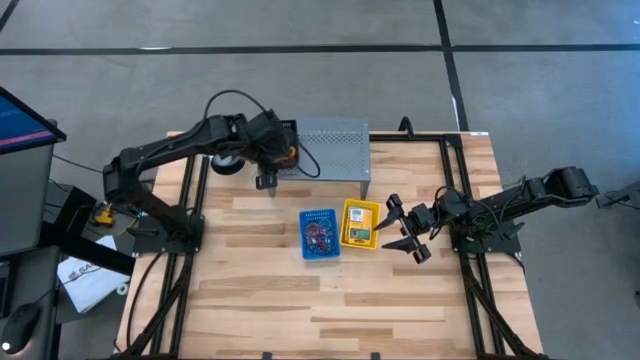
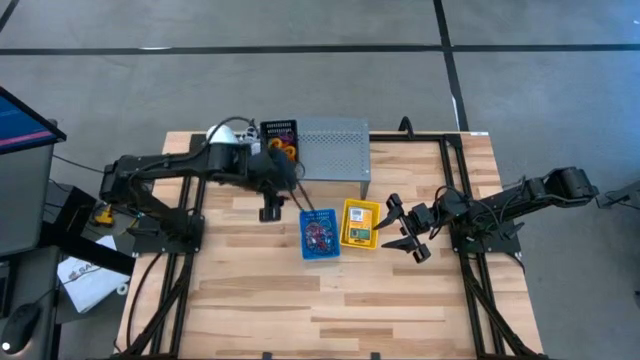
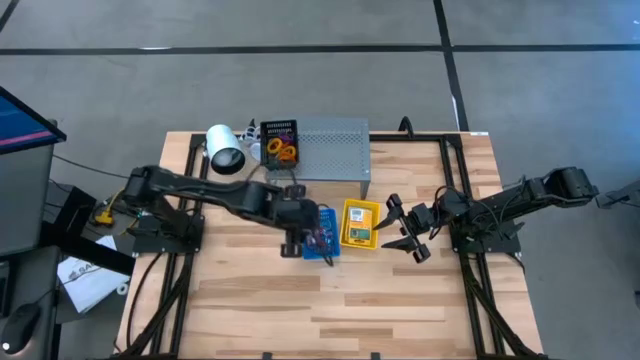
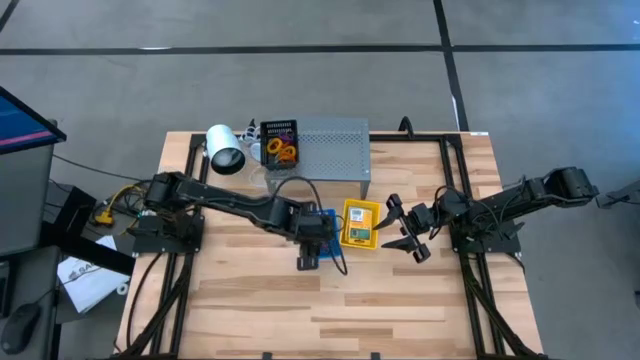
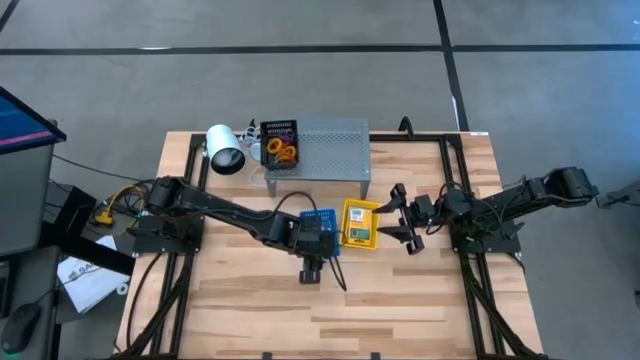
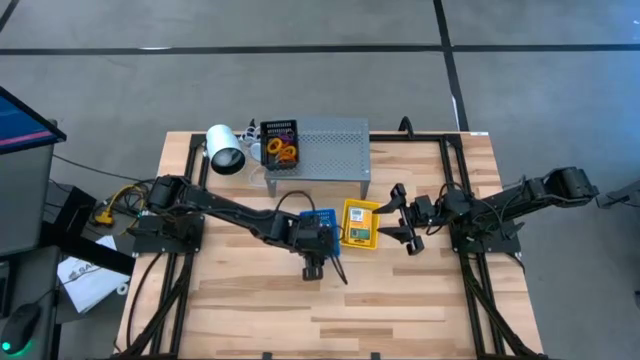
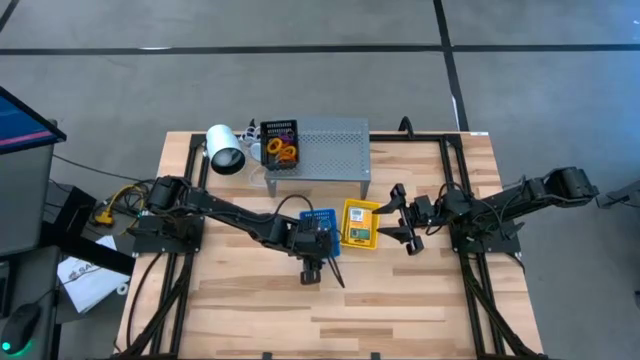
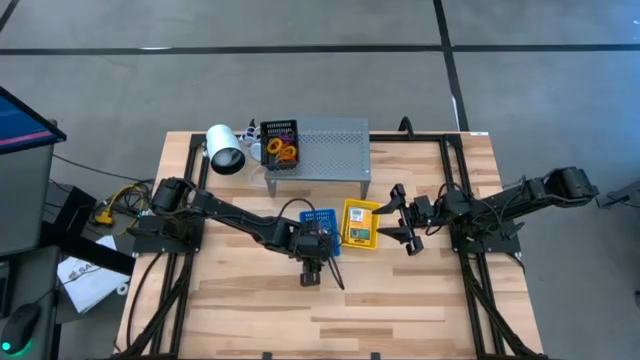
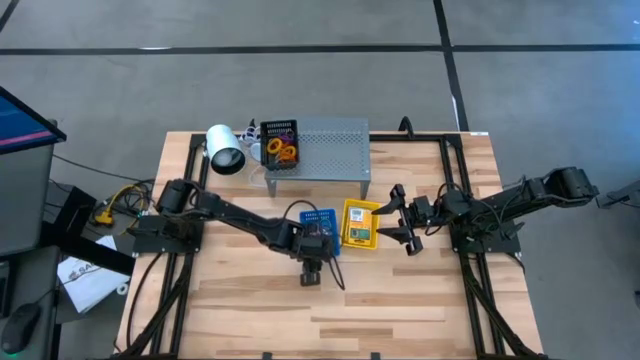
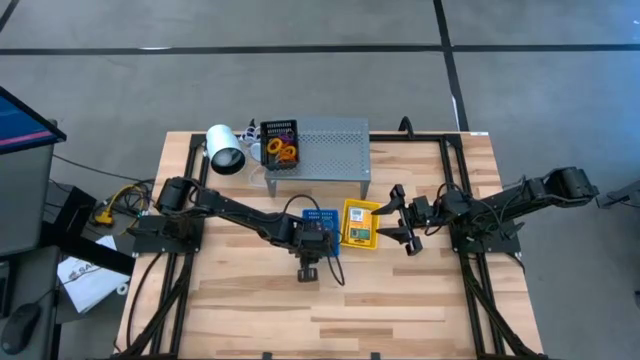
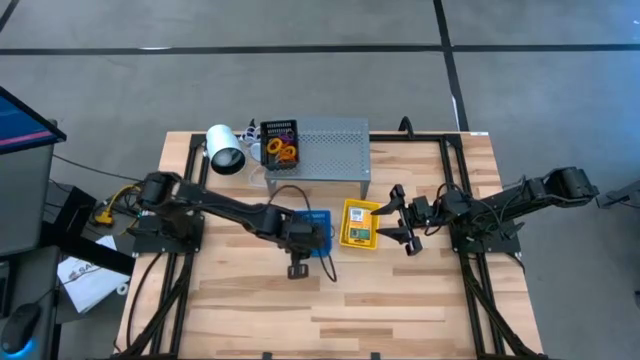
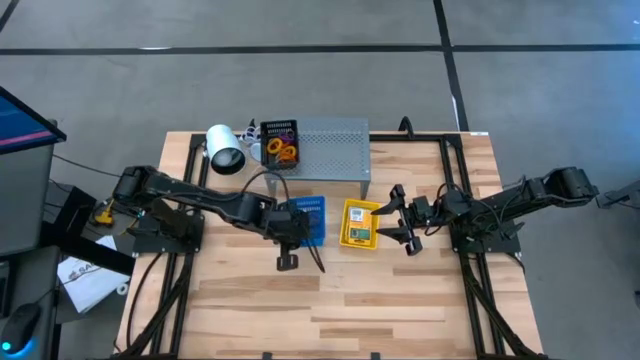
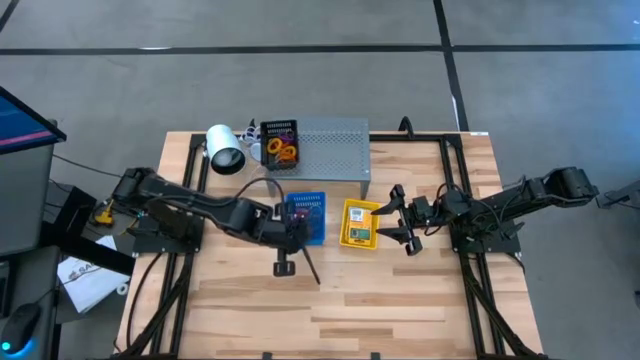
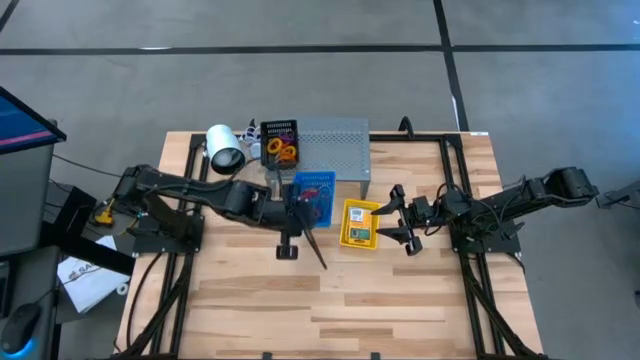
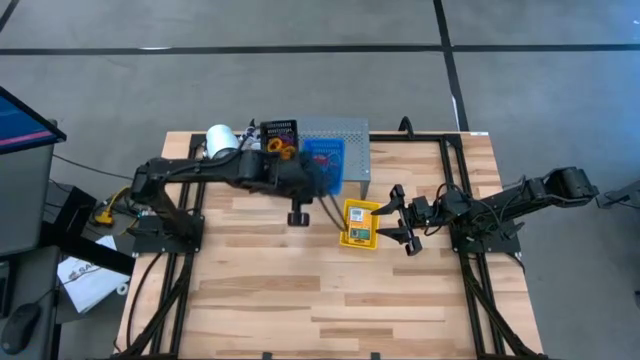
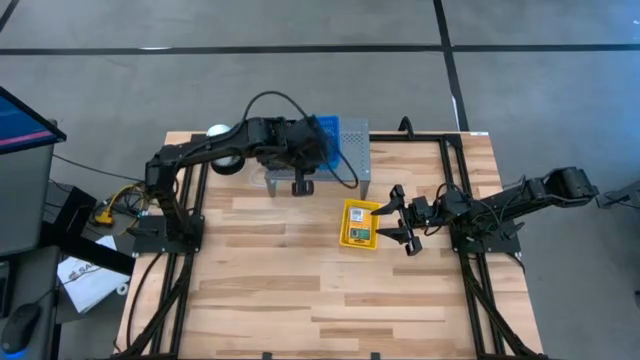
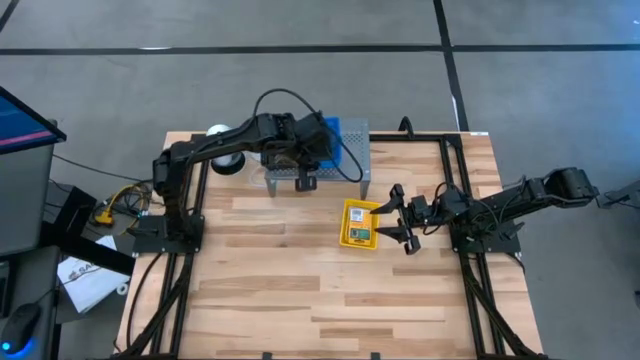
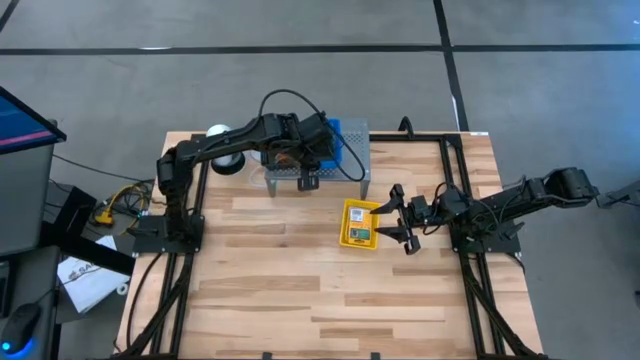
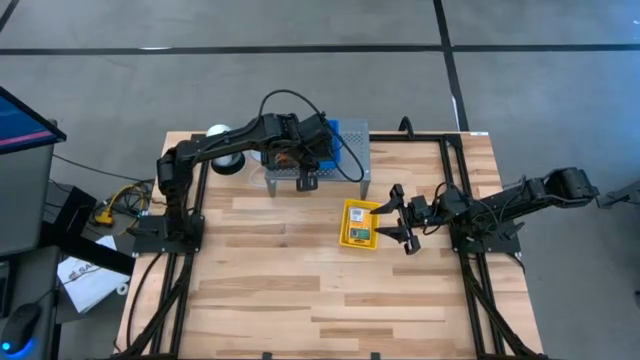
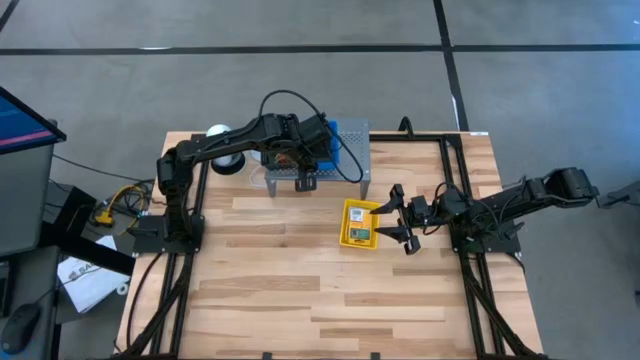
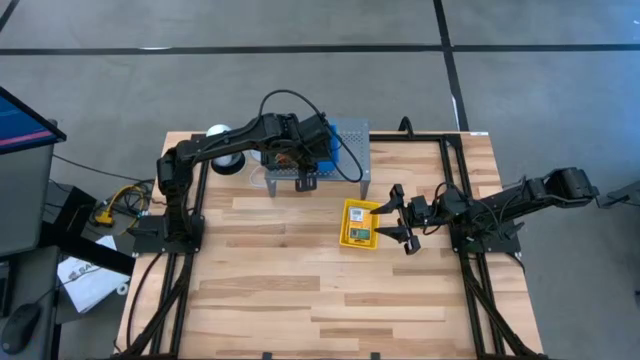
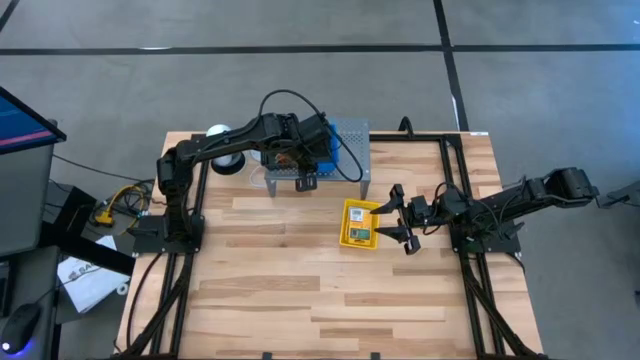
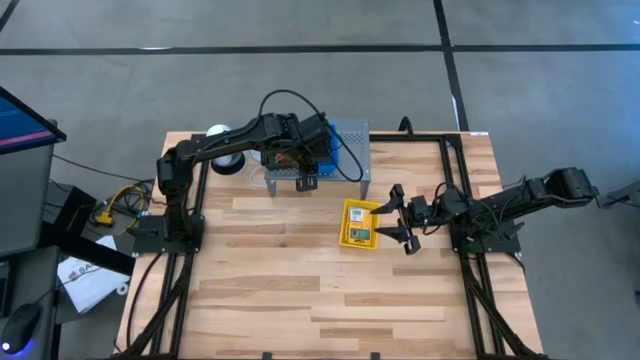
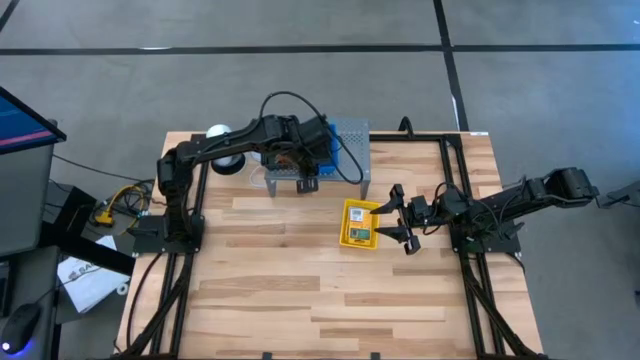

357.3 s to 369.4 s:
Task: Pick & Place Office Desk Supplies
Put the blue basket on the shelf

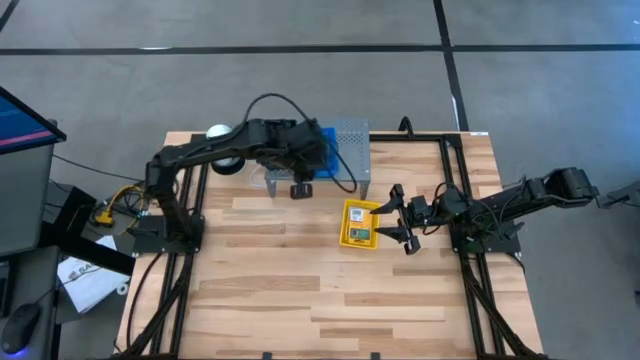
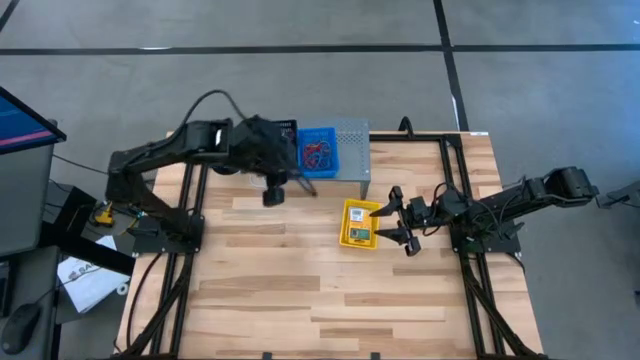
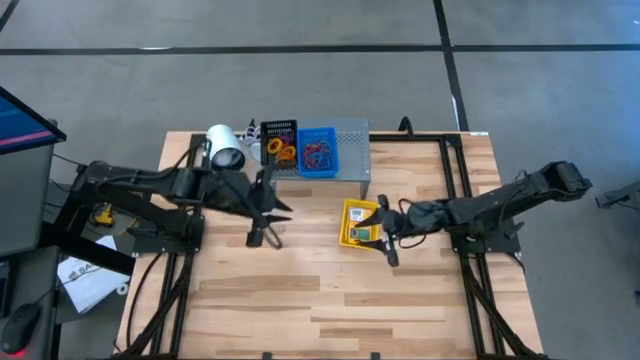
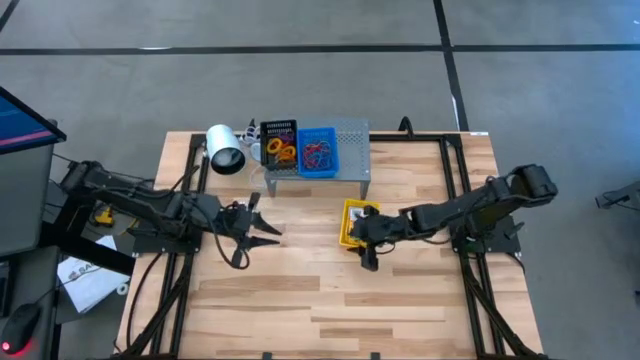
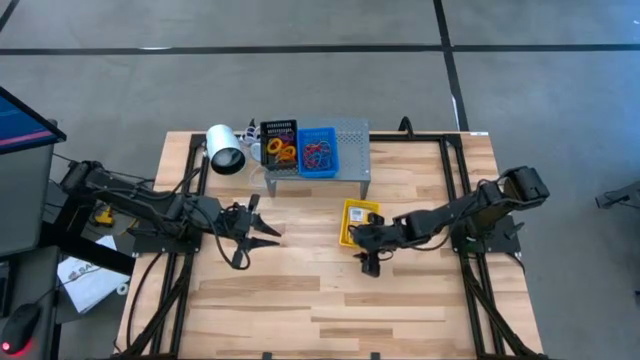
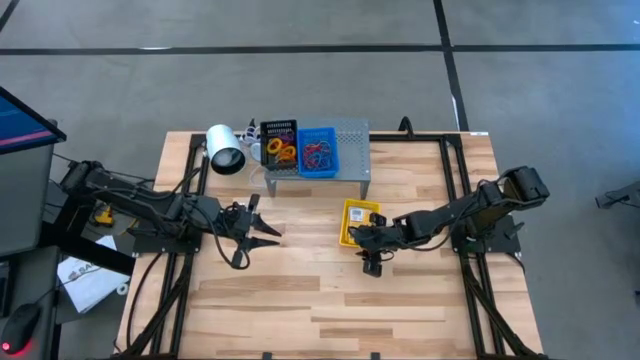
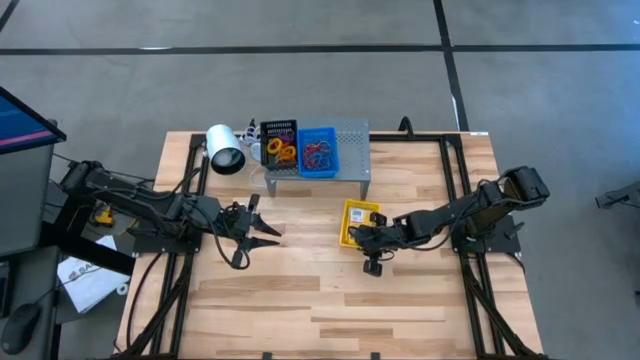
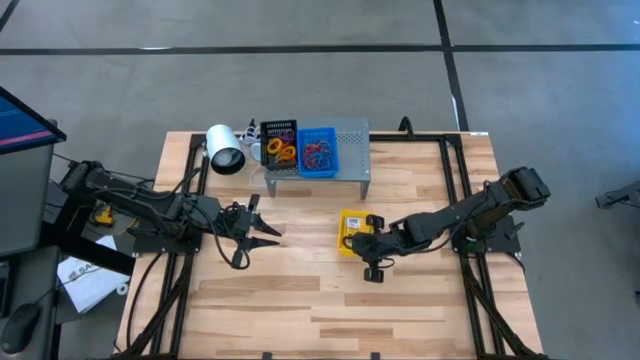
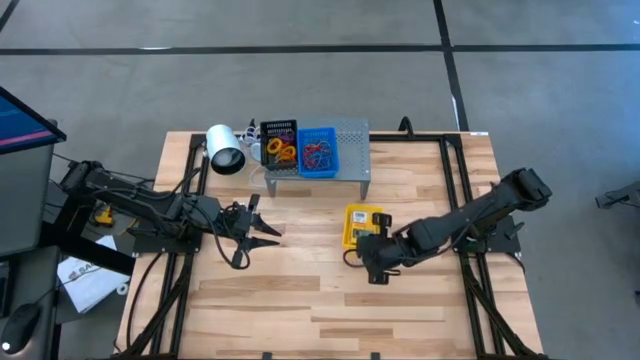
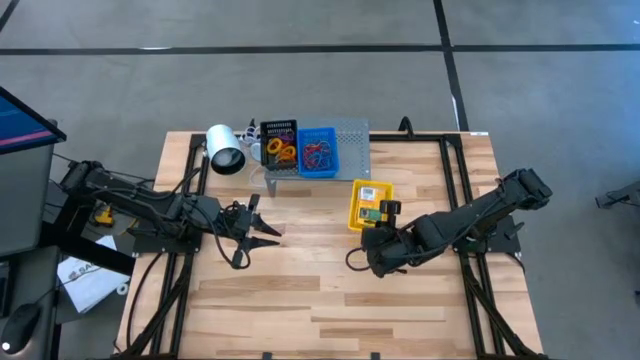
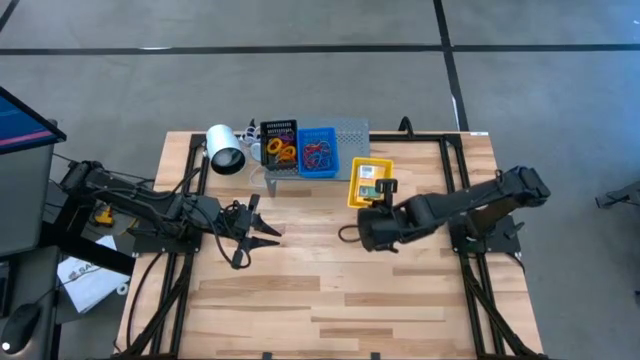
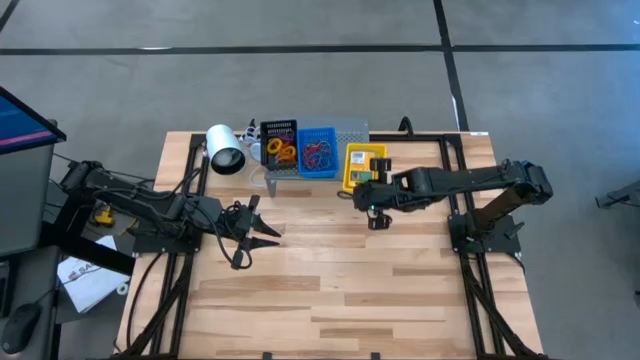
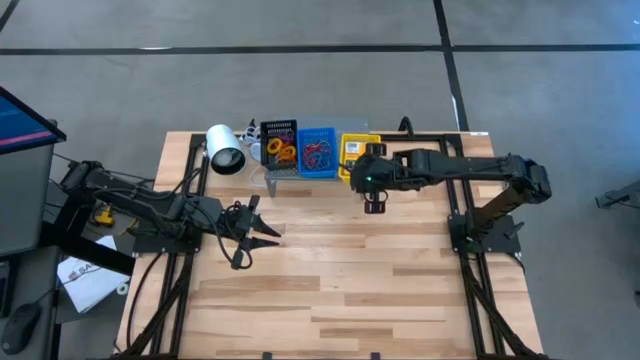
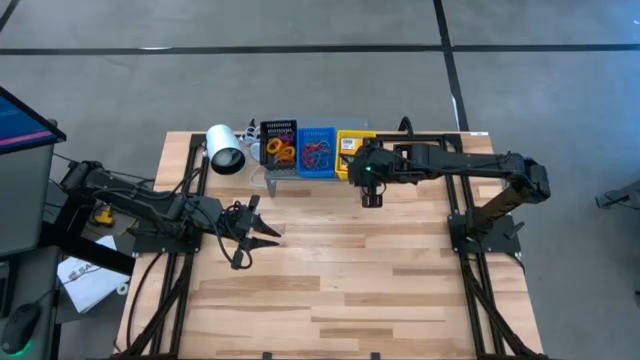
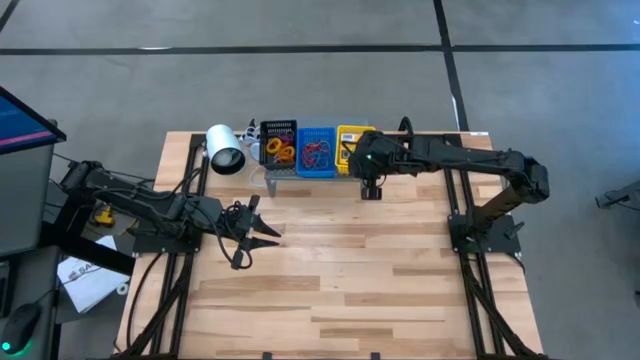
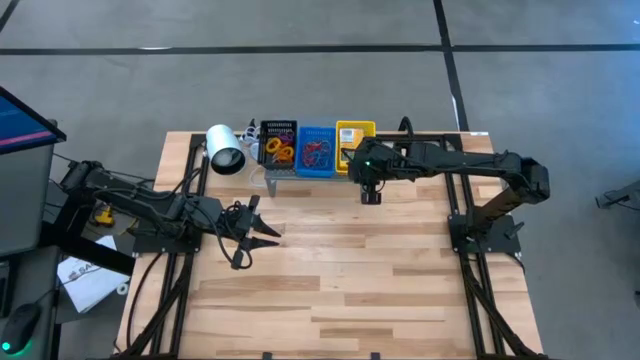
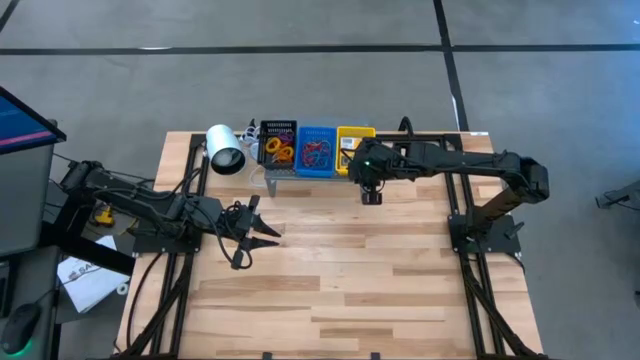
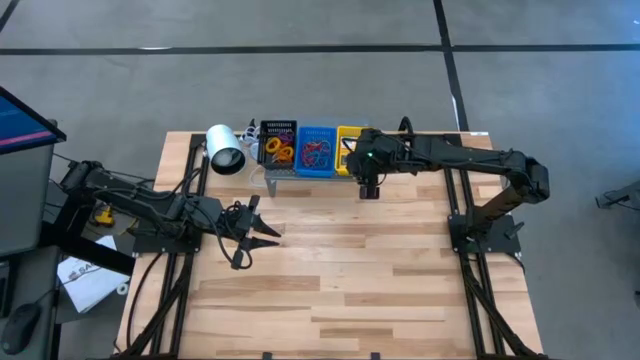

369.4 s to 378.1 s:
Put the yellow basket on the shelf

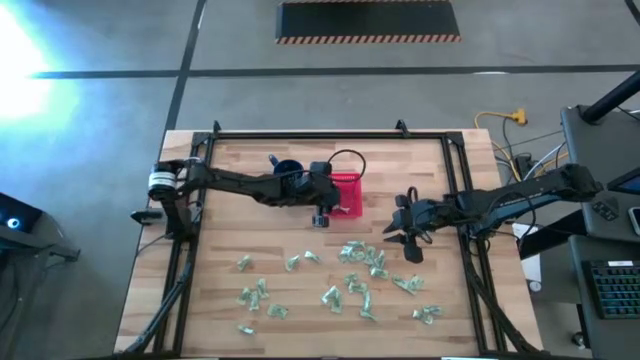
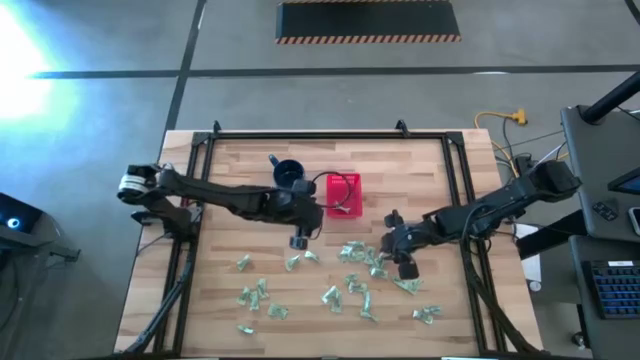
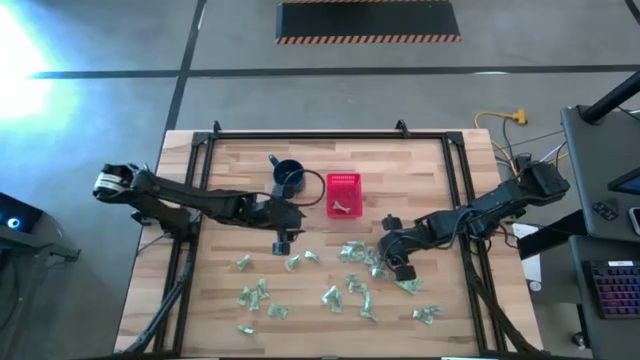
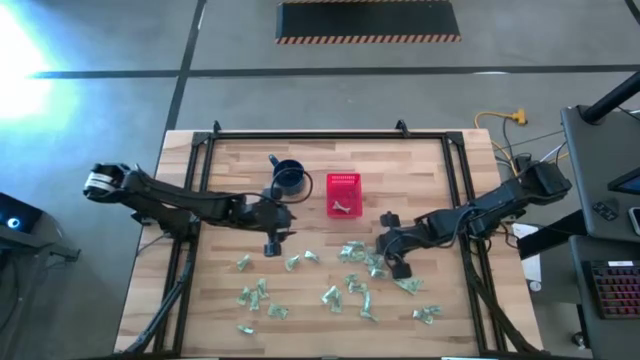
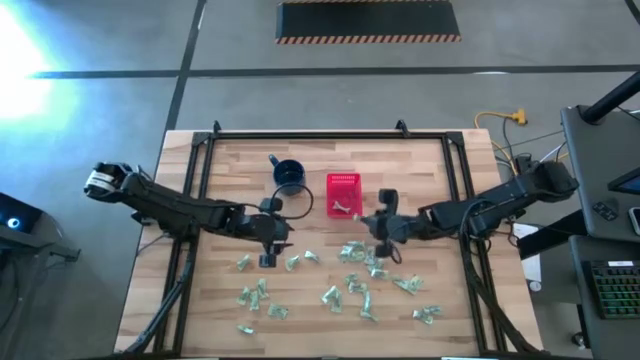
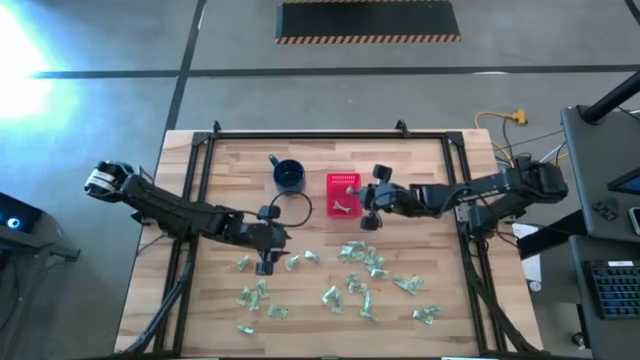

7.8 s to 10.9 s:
Task: Pick and place items into bin
Put the green stevia packet into the red bin
